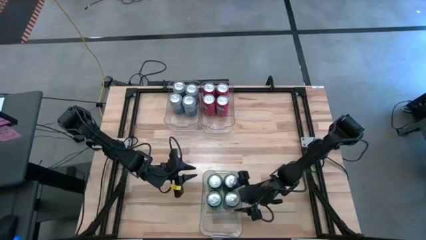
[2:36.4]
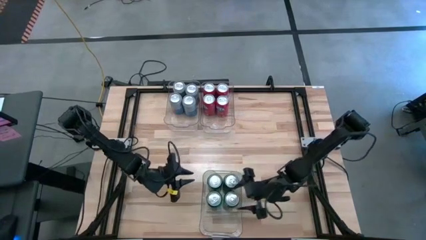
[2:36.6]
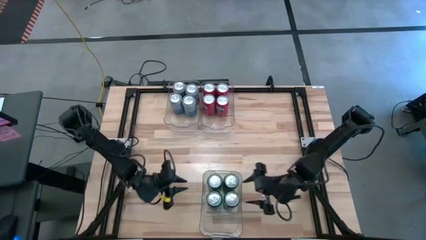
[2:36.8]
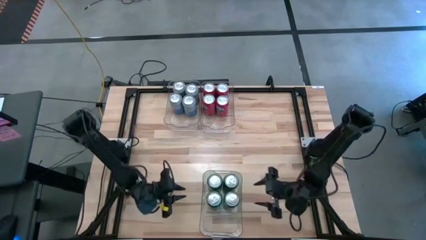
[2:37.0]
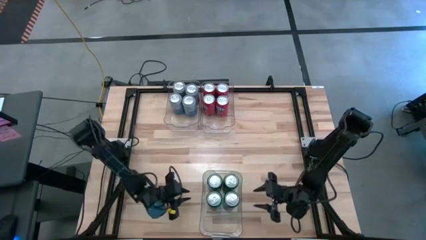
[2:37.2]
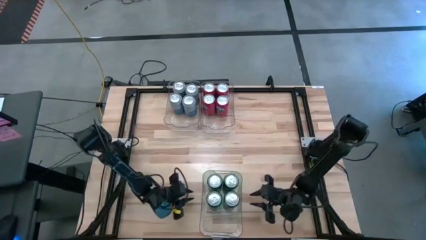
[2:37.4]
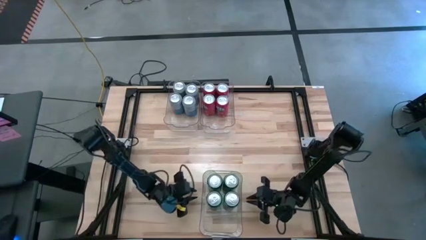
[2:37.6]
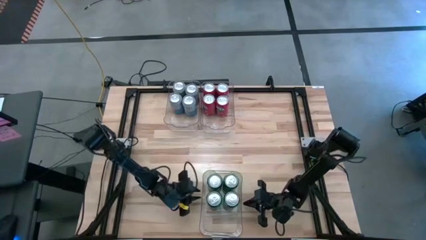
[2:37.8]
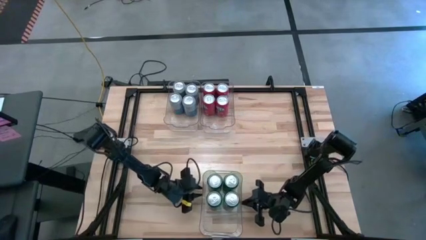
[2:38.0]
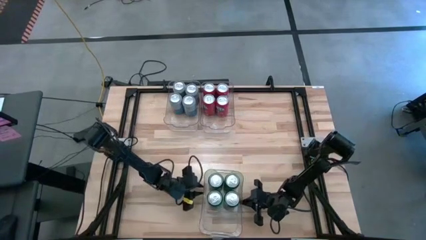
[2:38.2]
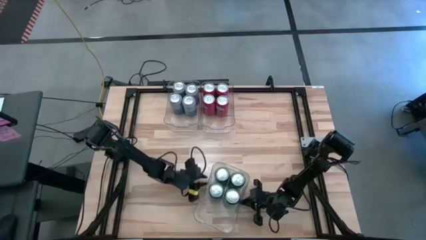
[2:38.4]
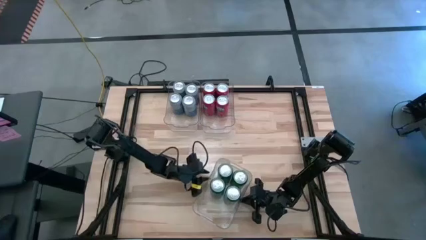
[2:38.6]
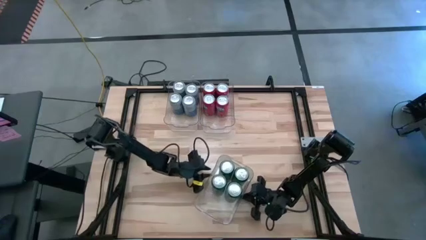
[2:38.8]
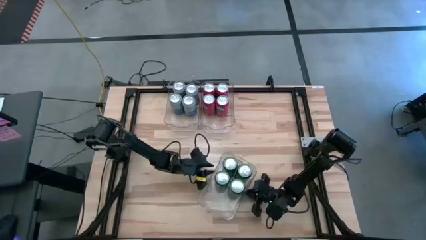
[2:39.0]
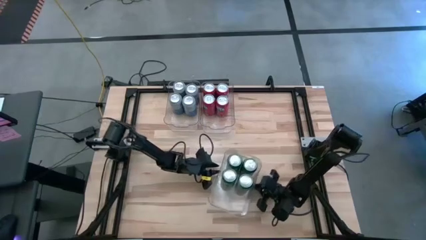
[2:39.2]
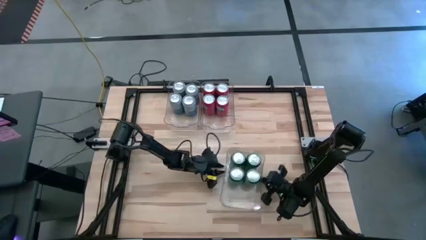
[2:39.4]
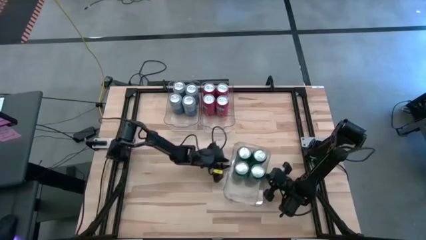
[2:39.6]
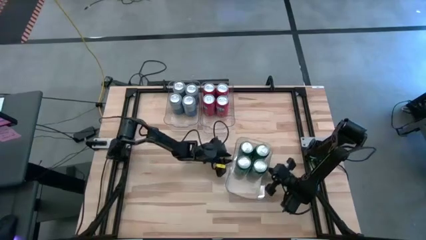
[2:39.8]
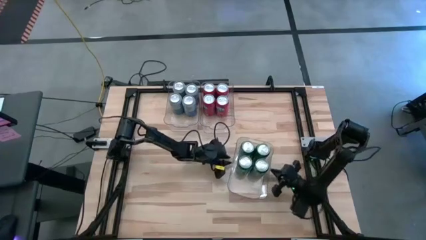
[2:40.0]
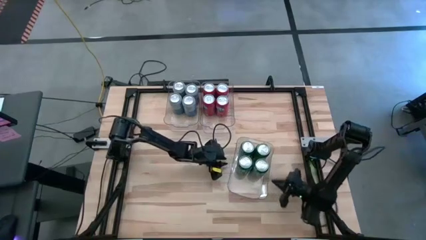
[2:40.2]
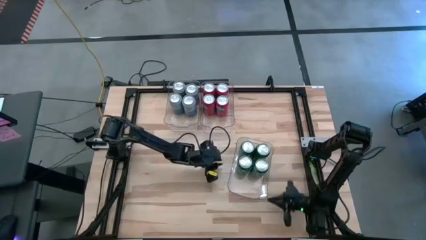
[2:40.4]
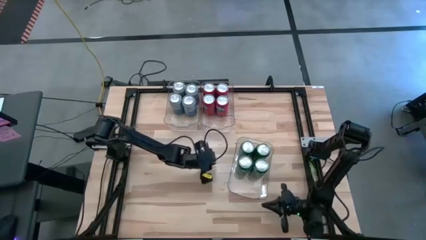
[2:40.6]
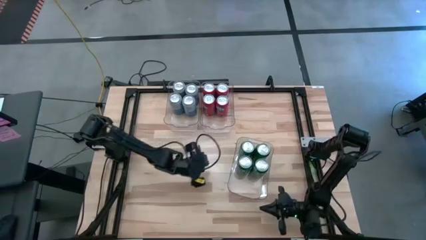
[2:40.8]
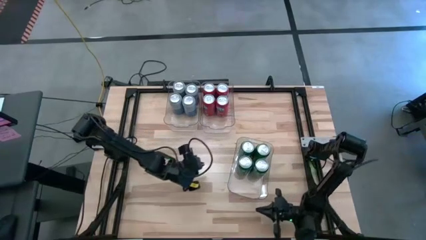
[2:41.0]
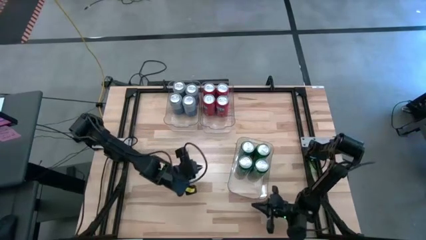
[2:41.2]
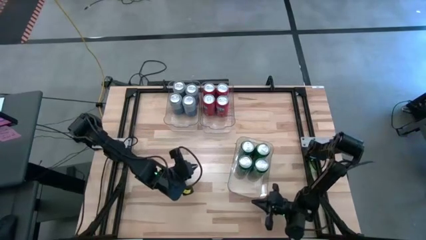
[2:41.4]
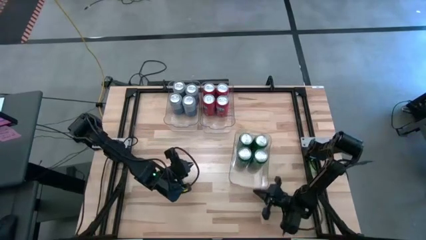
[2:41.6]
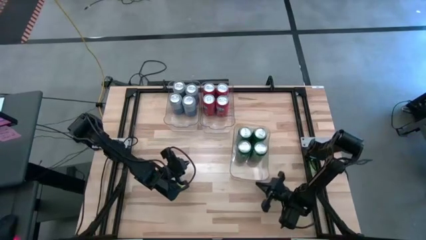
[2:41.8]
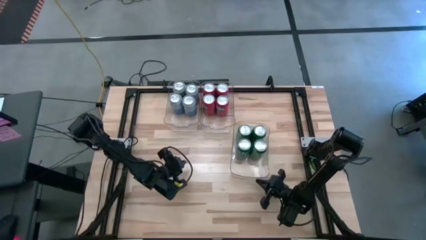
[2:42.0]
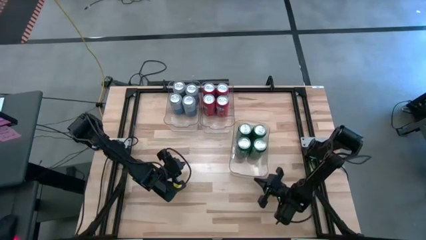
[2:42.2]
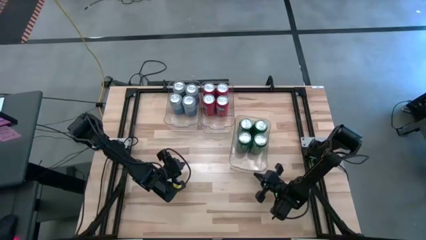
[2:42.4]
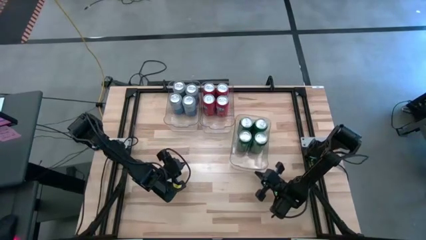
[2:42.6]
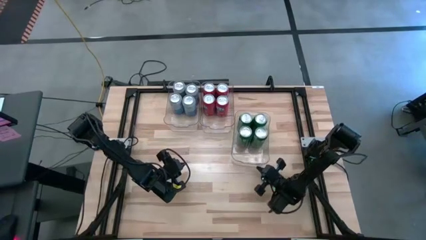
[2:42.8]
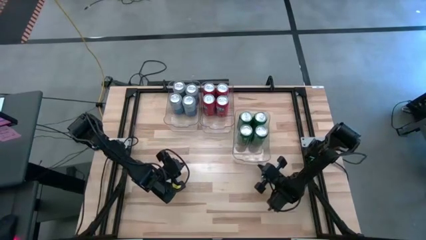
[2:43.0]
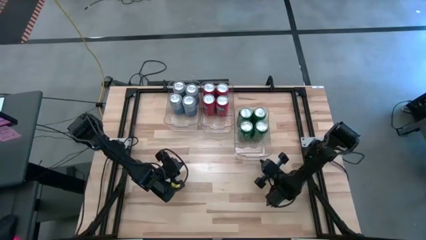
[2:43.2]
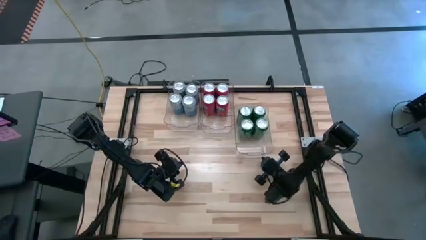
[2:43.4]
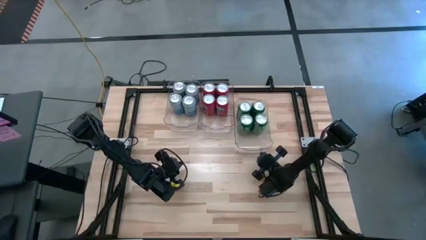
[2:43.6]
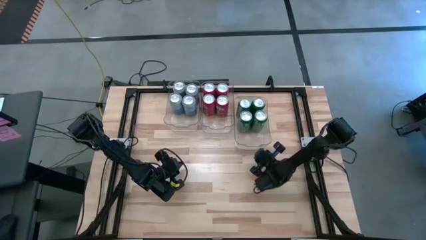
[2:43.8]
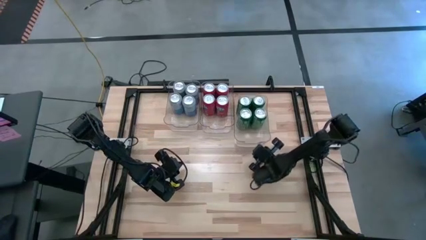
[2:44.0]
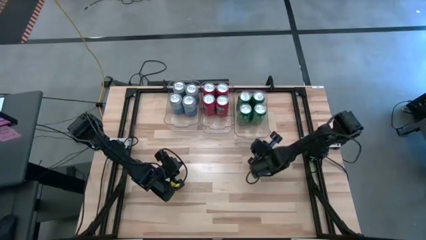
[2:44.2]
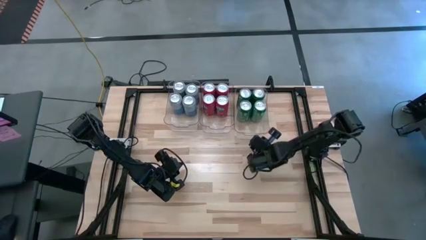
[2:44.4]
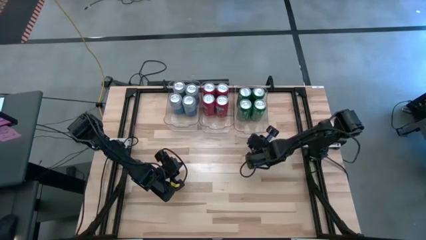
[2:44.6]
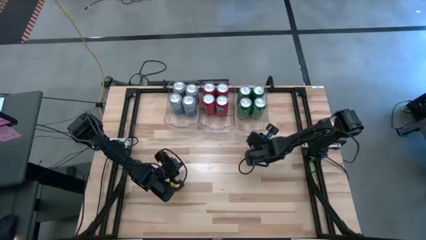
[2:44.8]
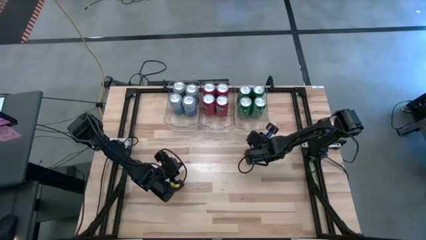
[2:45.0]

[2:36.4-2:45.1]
Task: Sort soda cans
Move the bottom transparent bin to the top right of the table

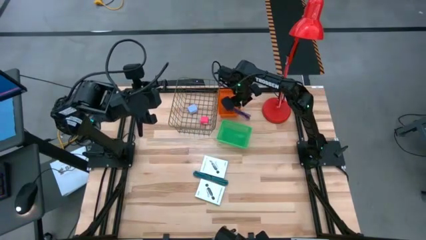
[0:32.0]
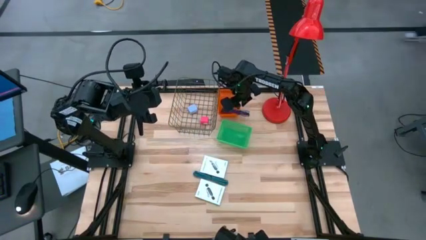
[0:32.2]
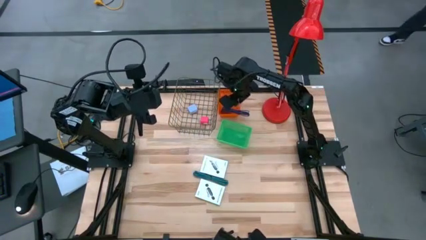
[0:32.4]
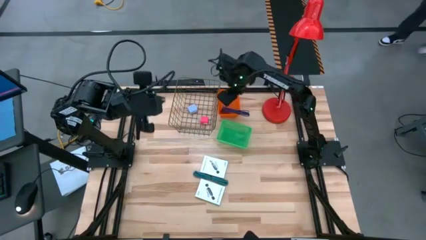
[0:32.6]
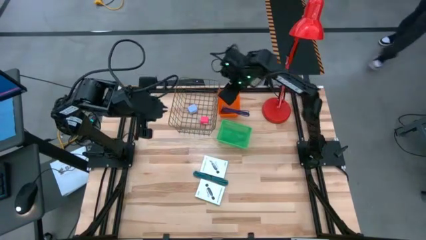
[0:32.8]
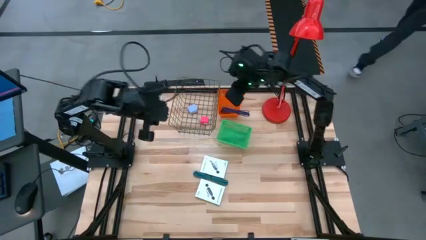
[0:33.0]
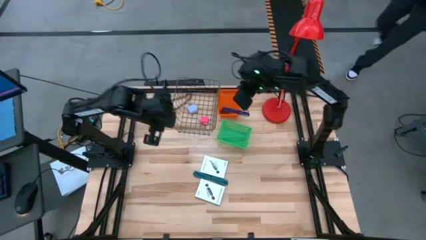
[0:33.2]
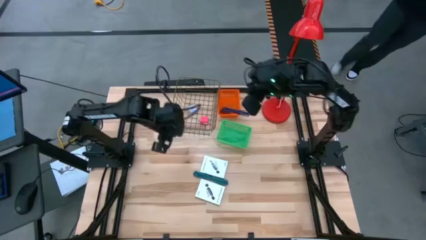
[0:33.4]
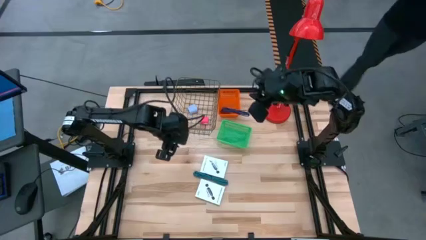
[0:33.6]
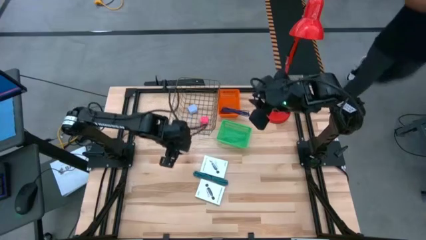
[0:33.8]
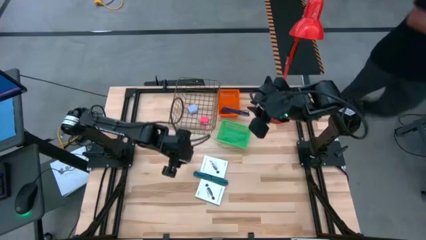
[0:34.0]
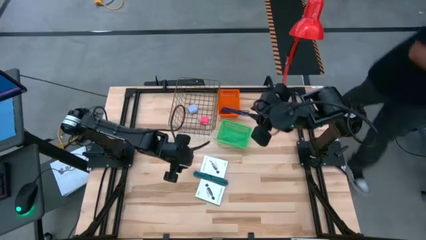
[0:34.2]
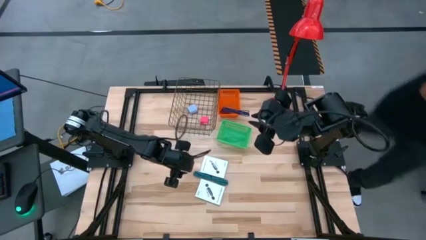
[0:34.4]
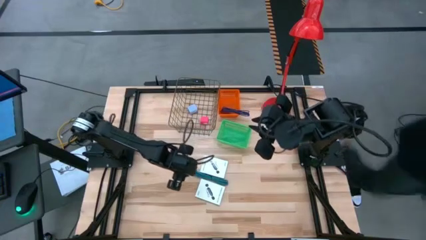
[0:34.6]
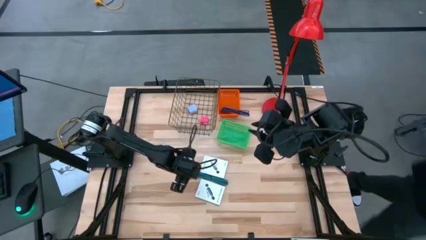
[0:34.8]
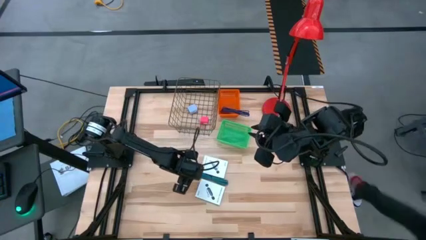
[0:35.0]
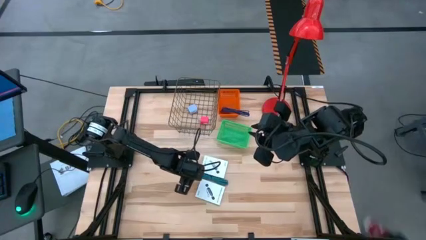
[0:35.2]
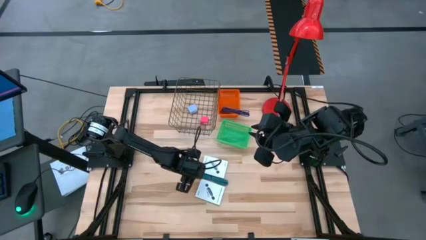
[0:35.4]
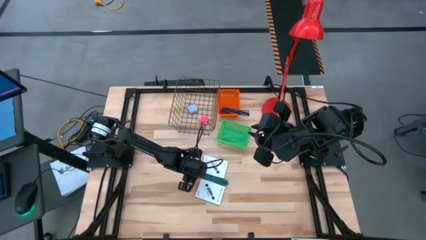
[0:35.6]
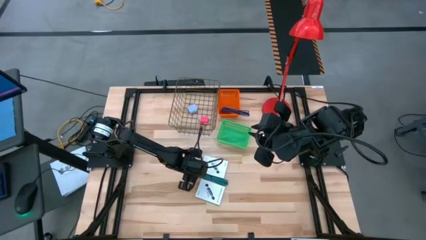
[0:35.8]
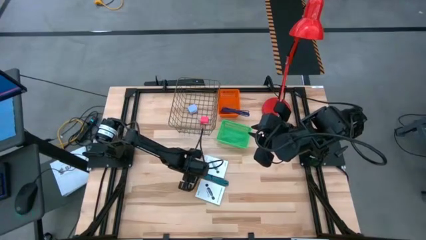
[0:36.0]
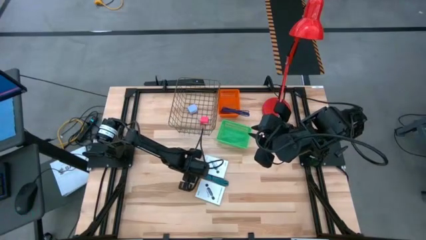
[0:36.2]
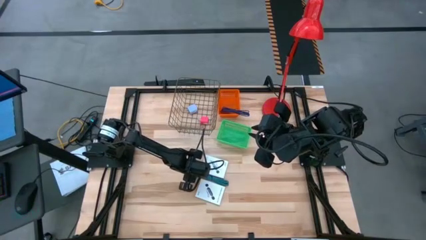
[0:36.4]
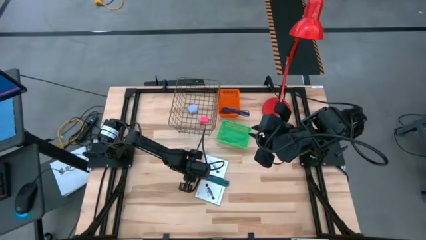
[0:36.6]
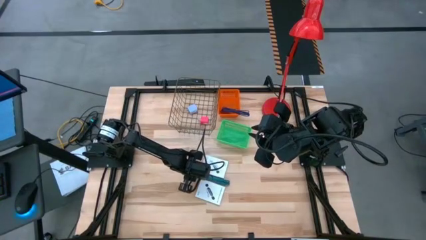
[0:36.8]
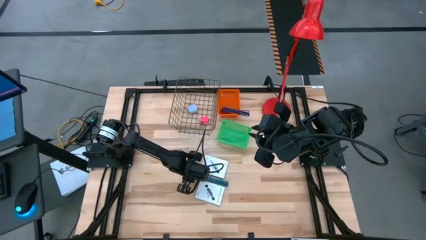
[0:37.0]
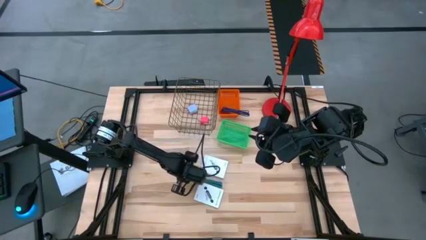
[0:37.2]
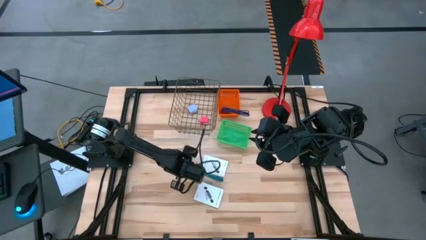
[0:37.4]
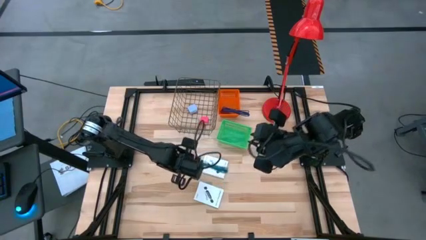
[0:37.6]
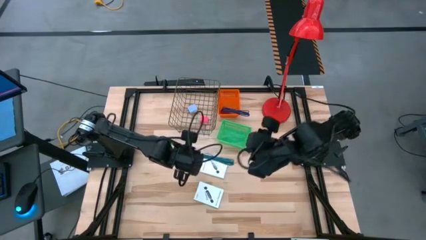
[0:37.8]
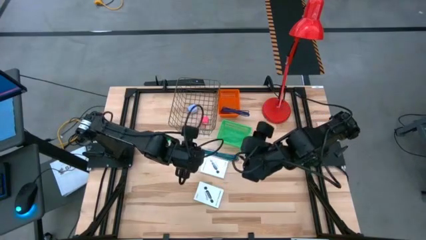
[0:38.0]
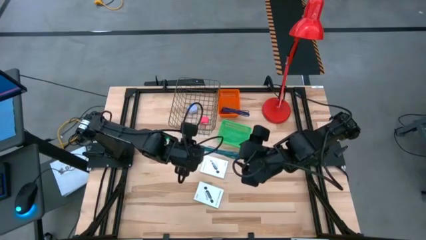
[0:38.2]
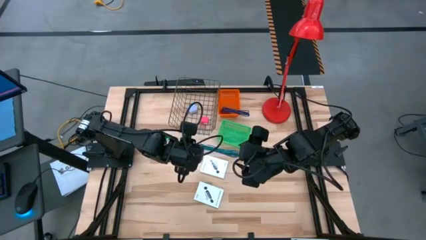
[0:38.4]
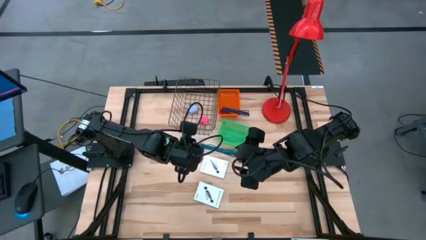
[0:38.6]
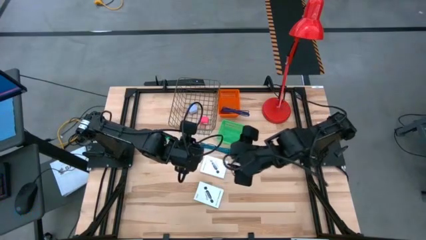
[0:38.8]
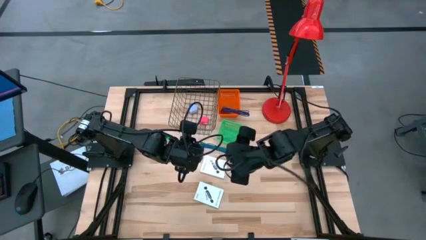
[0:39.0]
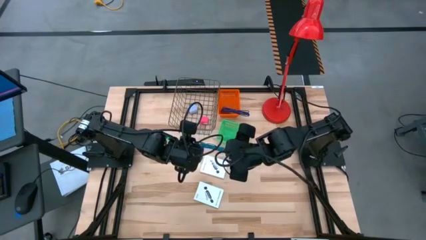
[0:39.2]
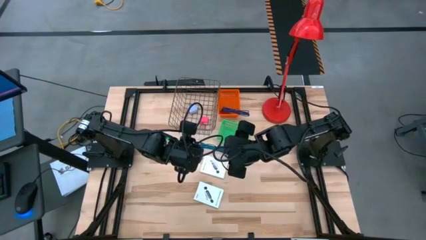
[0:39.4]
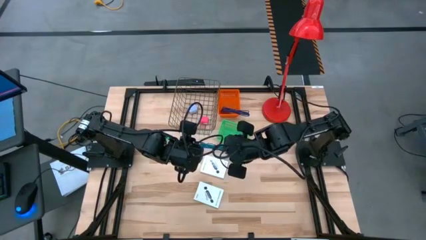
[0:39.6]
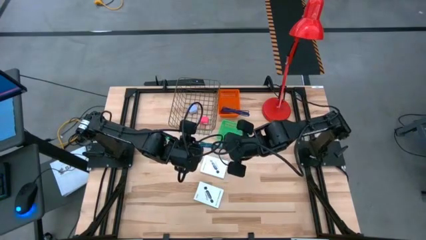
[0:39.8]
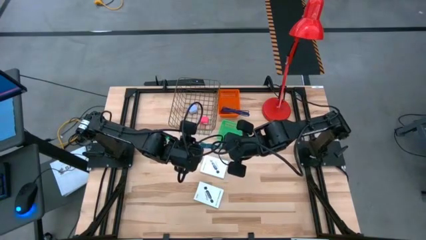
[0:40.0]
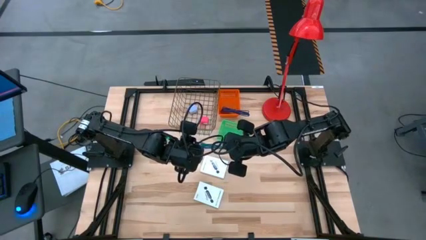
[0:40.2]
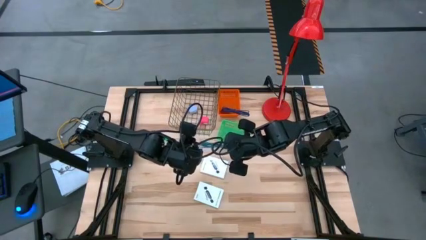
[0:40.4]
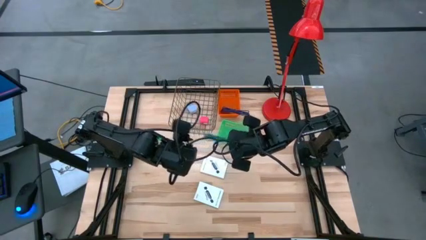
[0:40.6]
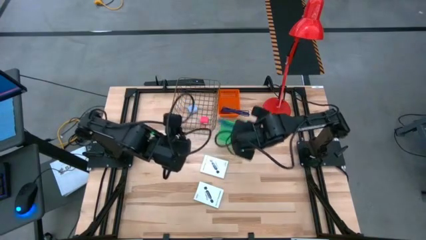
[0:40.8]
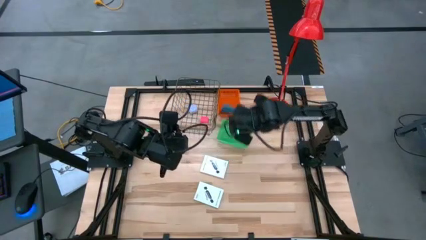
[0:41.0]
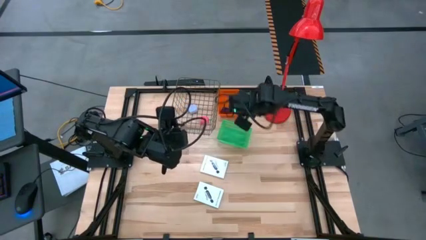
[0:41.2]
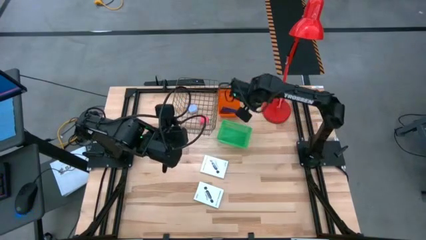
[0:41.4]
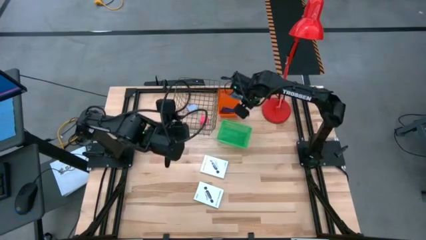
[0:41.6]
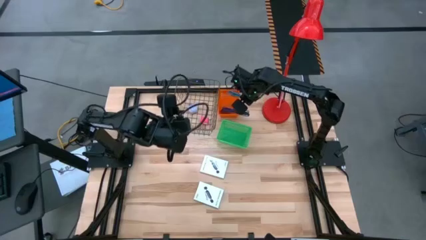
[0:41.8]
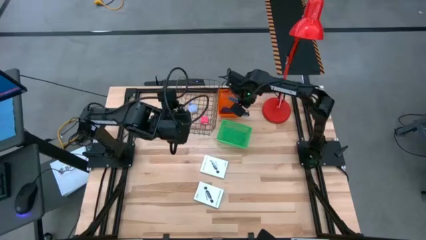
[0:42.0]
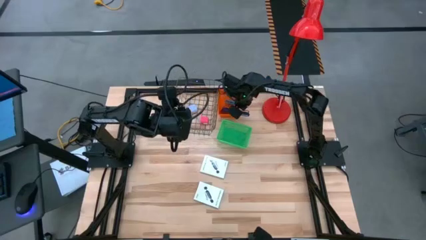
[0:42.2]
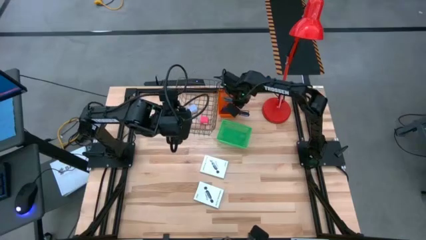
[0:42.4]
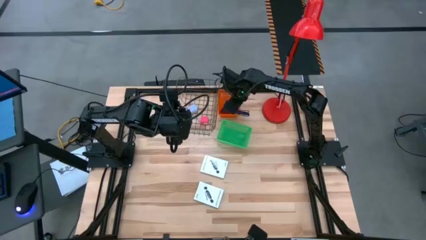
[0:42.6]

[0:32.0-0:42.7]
Task: Pick and place items into bin
Put the blue charger cable into the orange basket
